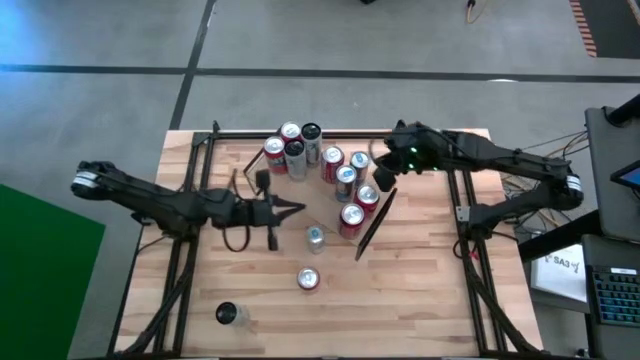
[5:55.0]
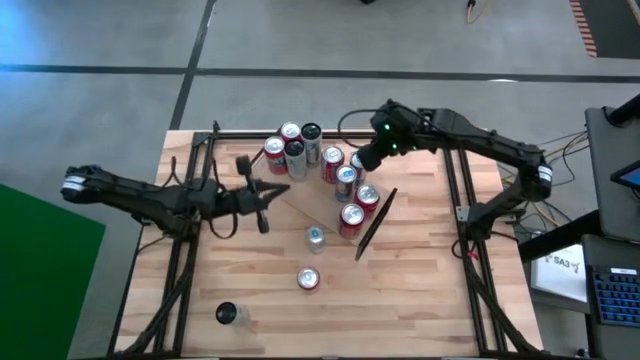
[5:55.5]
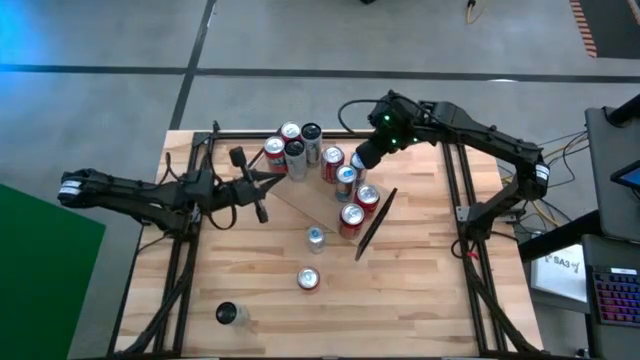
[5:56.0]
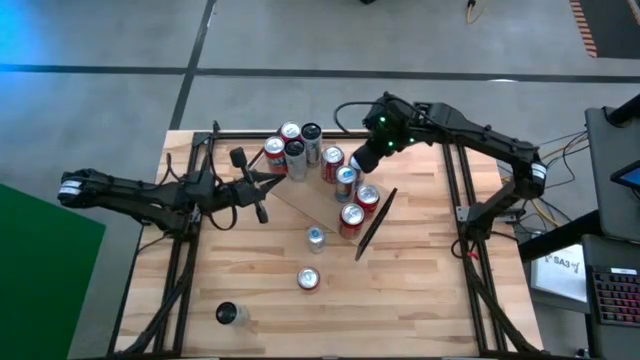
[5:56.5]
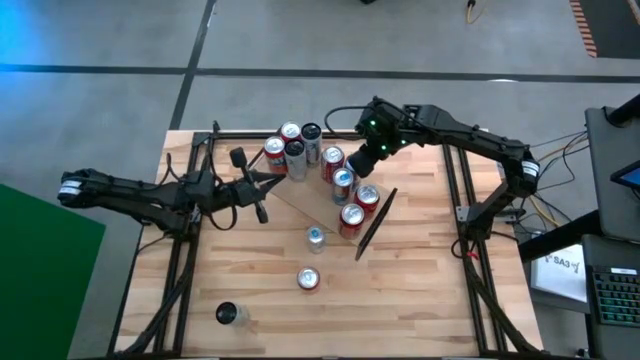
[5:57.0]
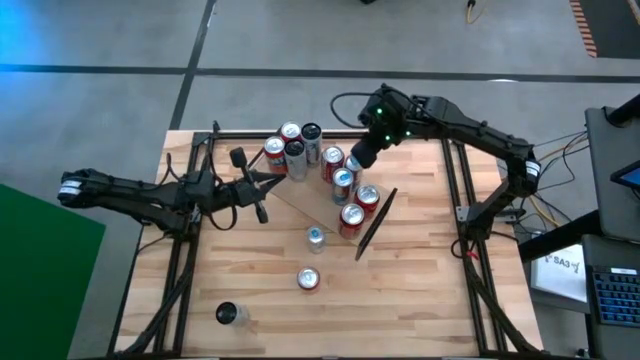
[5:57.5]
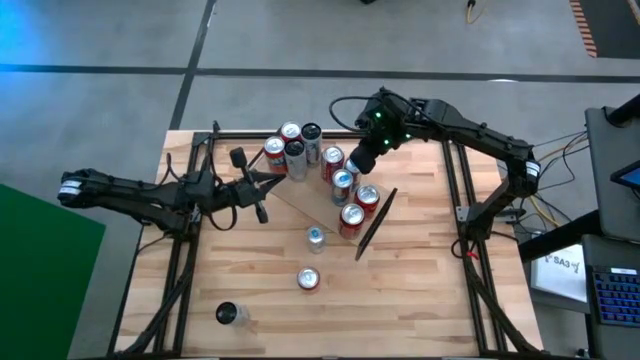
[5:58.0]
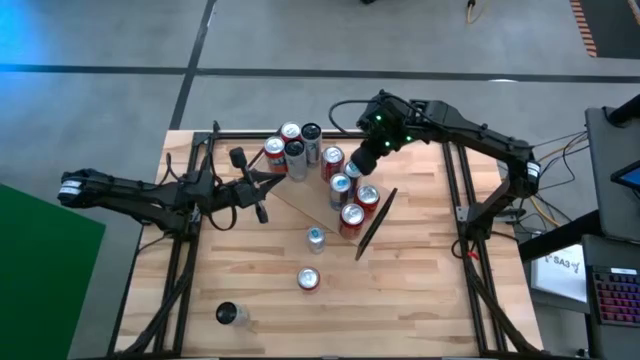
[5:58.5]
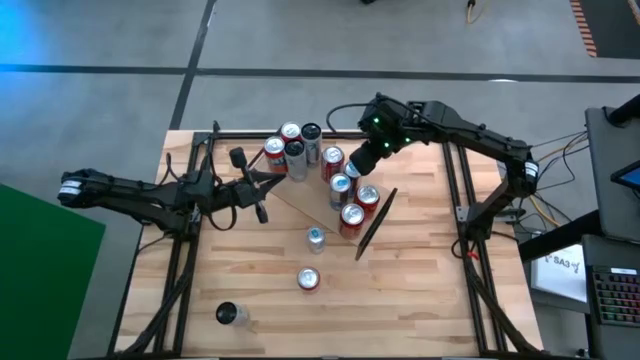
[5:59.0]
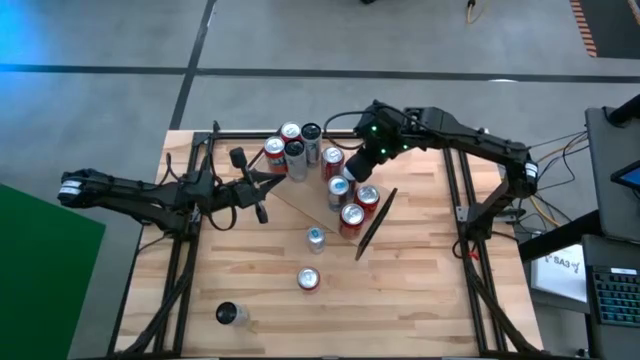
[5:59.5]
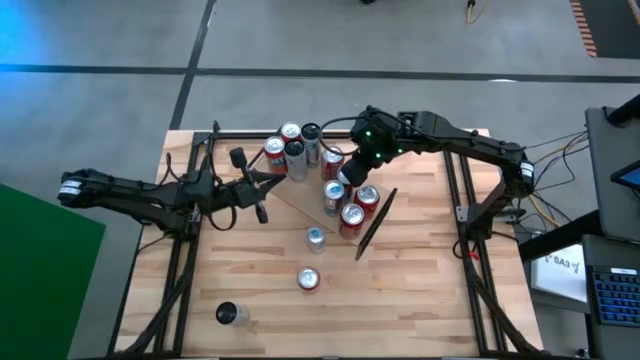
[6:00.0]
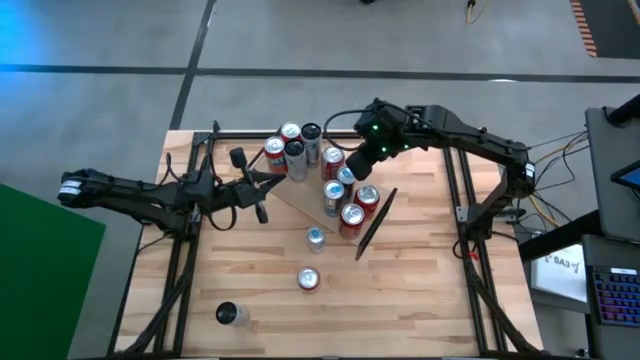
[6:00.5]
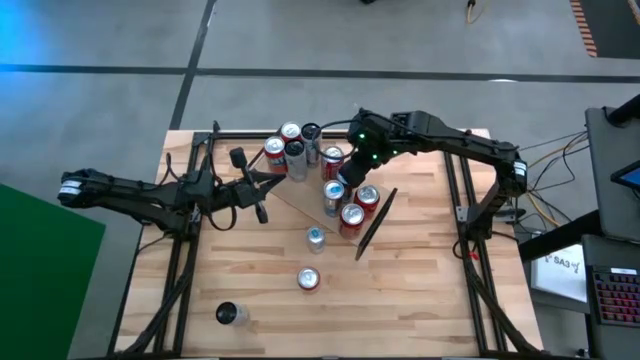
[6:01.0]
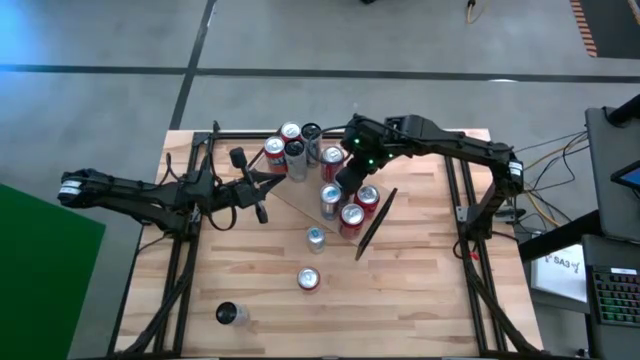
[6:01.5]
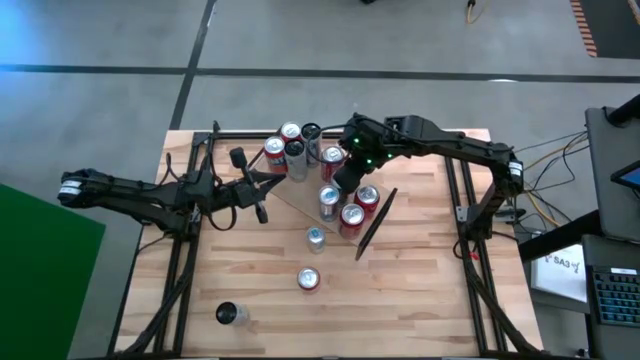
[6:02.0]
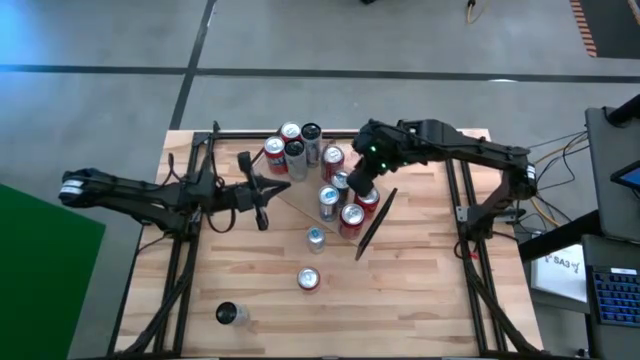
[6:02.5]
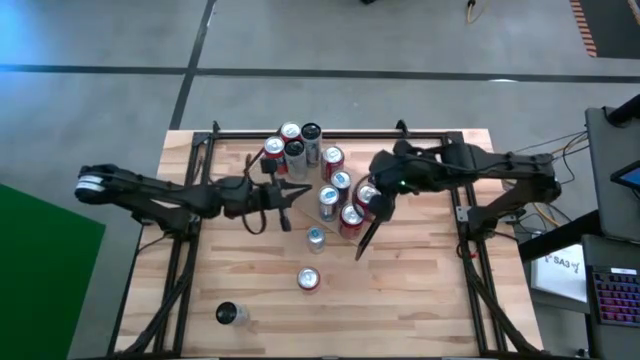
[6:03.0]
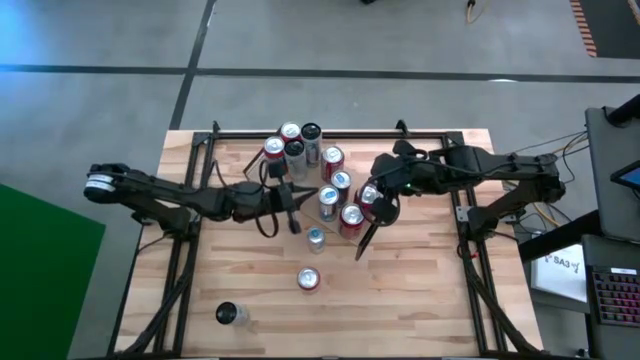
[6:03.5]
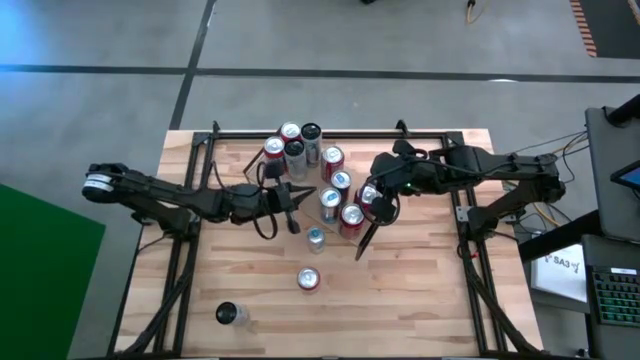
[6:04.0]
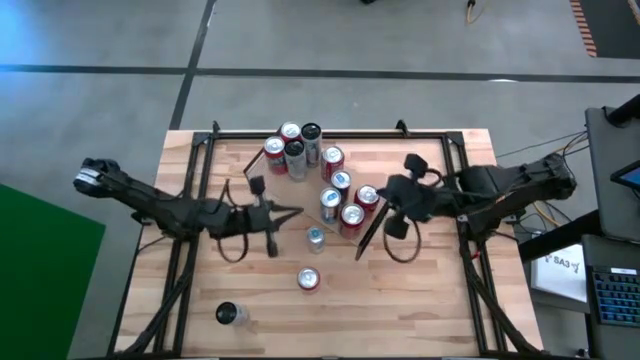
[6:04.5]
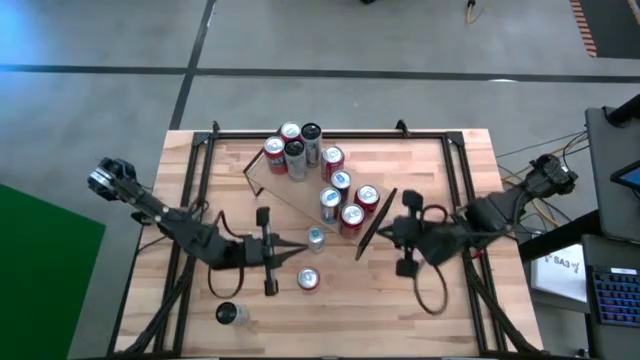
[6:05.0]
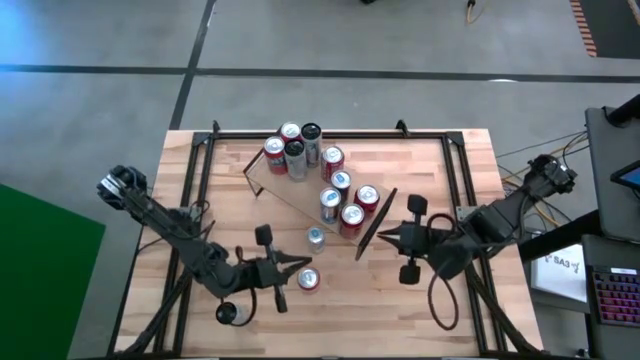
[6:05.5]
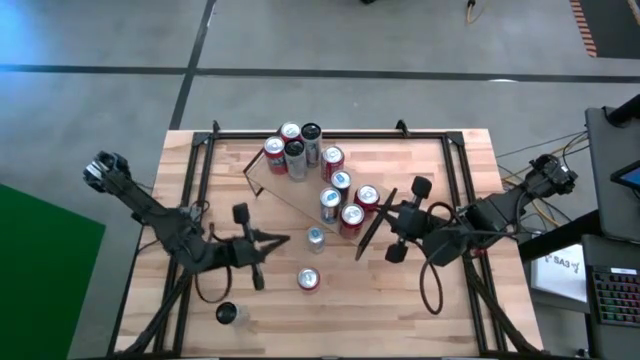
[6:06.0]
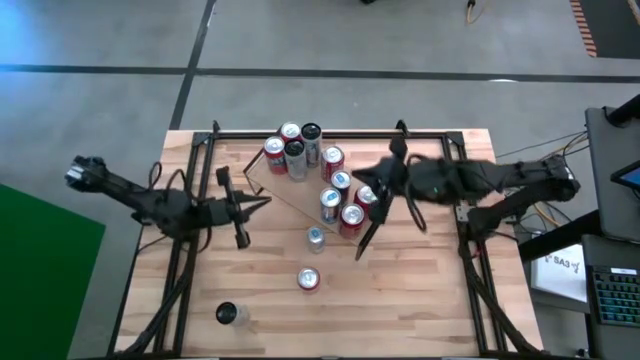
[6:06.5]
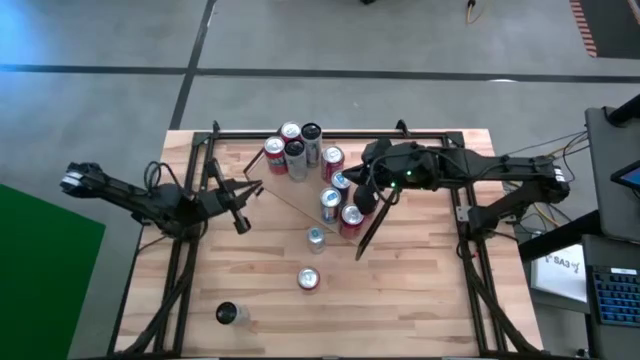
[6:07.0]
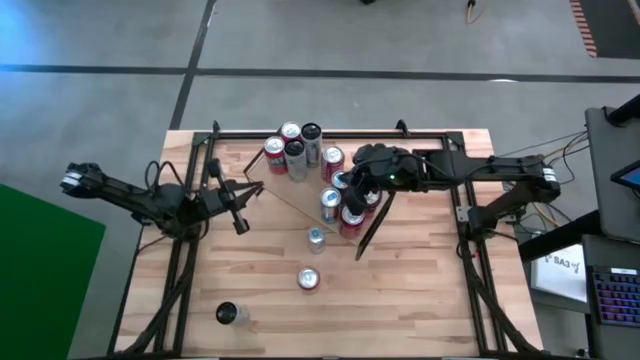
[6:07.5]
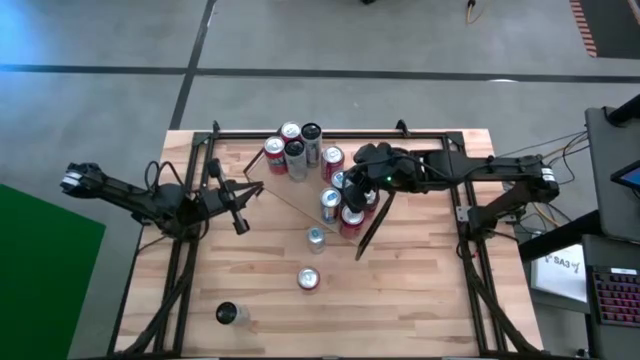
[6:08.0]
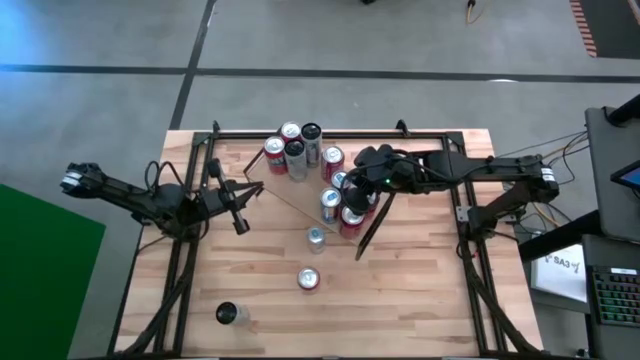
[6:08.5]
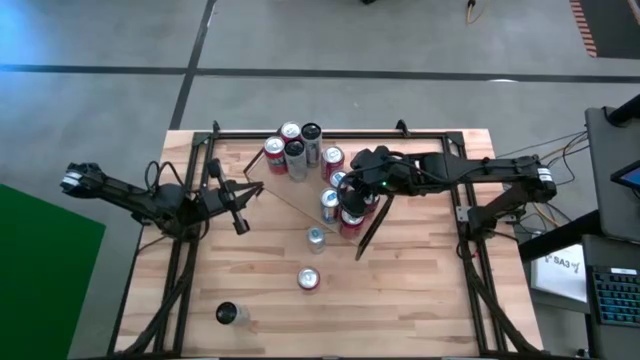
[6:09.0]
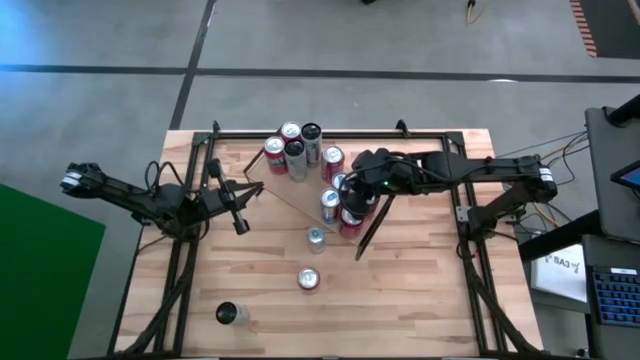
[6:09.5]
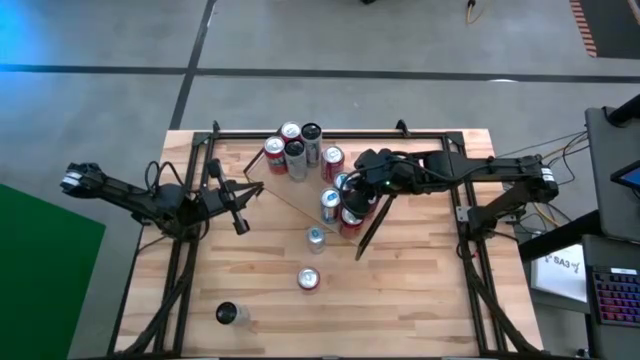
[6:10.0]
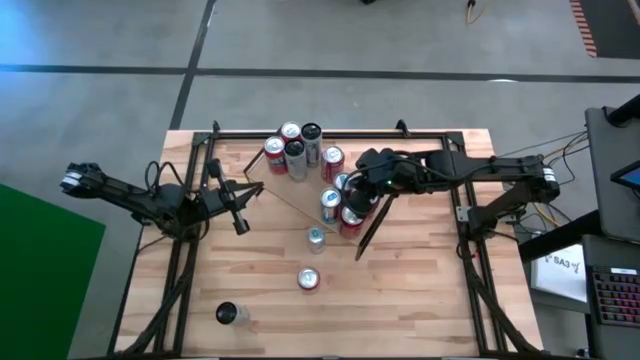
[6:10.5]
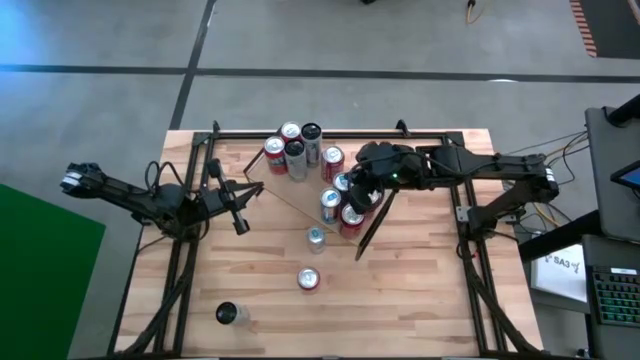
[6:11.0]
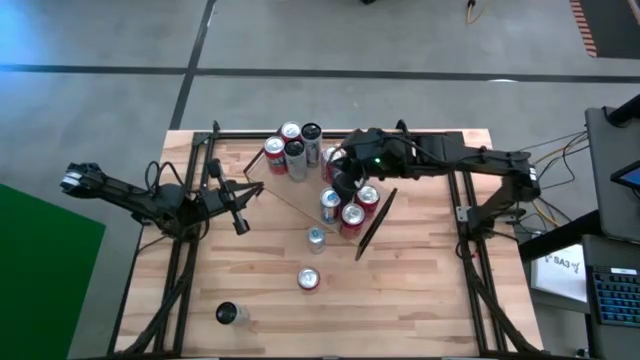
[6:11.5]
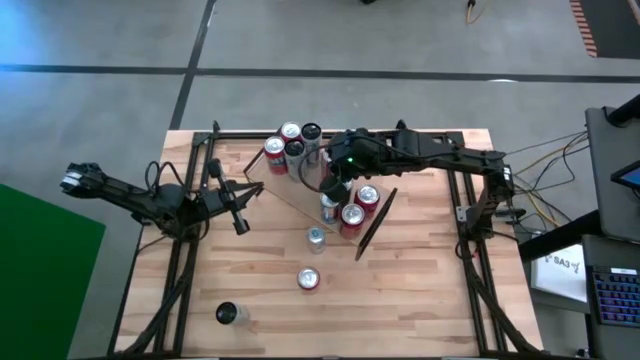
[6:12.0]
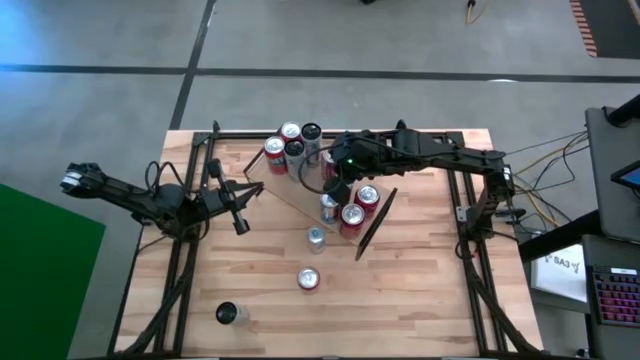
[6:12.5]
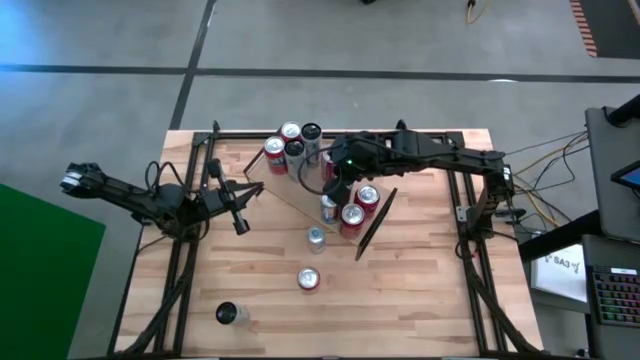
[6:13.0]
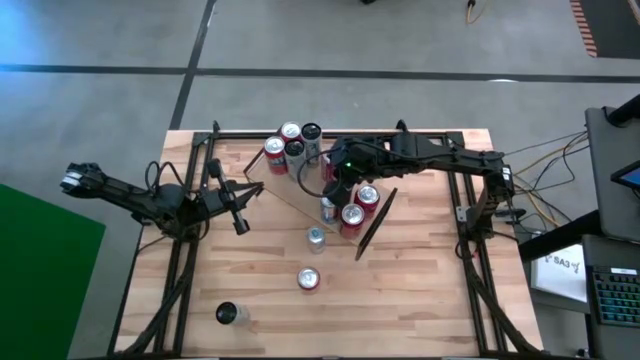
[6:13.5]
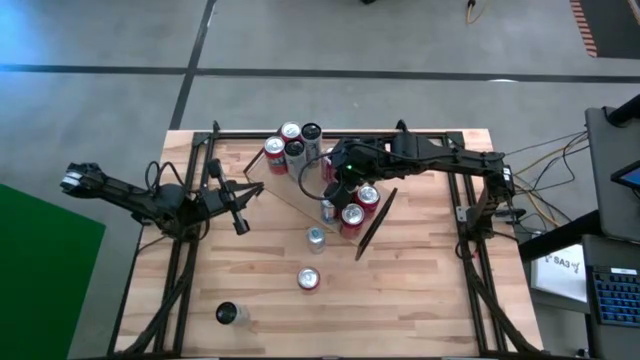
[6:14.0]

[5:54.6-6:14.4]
Task: Place canned beverage on shelf
Adjust the silver/blue soda cans on the shelf

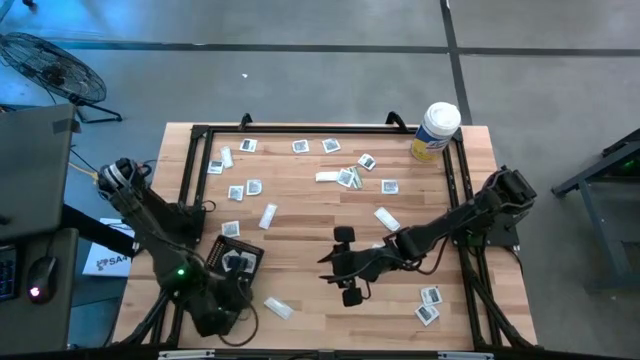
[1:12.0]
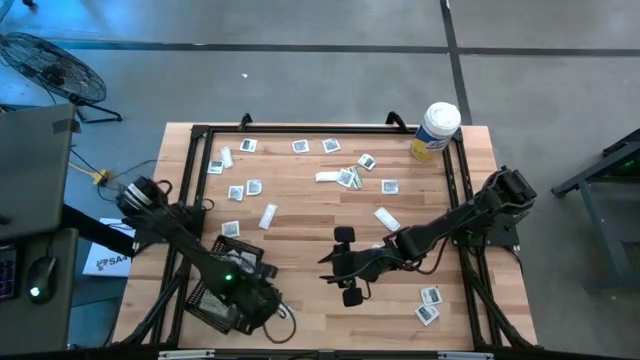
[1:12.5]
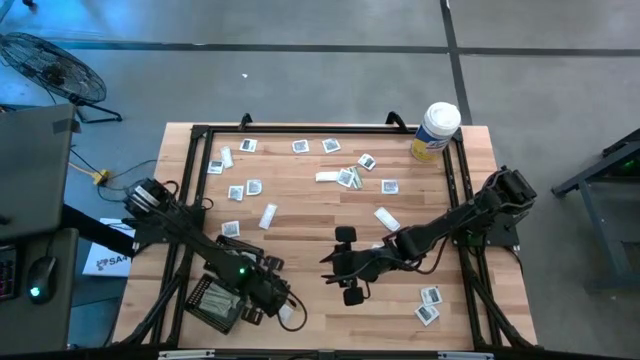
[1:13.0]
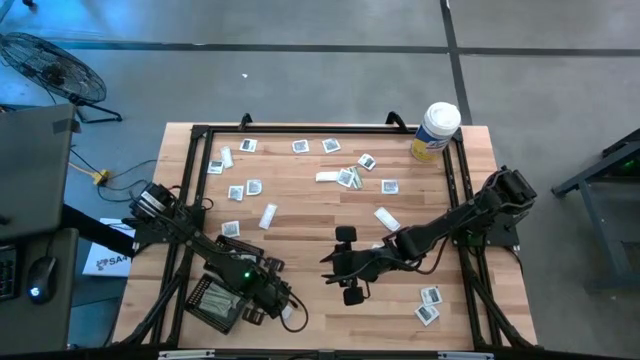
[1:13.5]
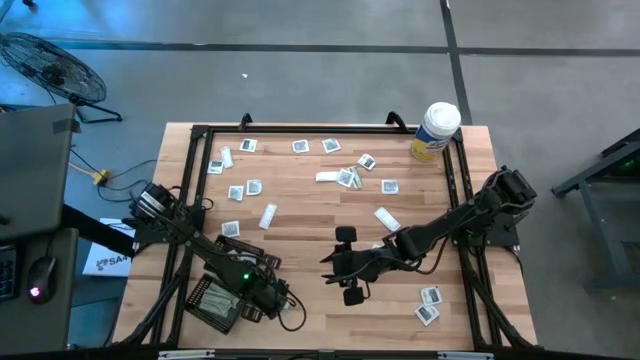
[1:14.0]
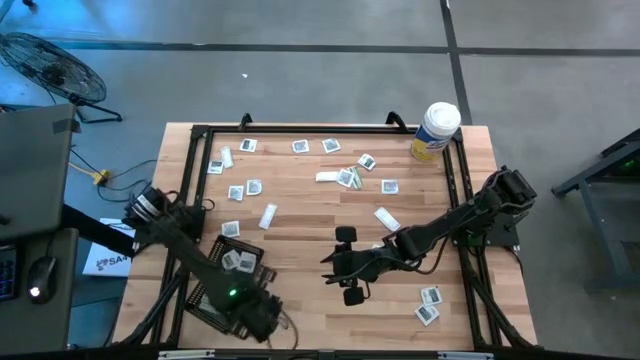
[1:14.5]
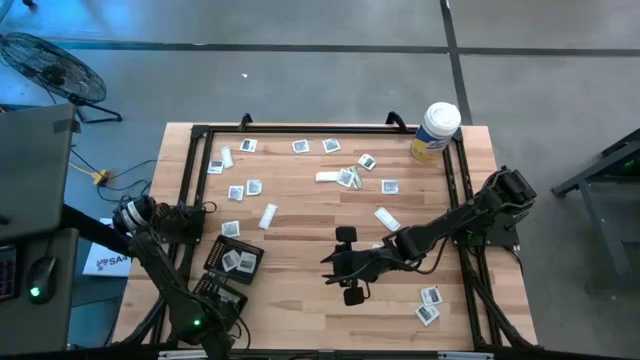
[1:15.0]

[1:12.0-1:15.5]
Task: Pick & Place First Aid Supplies
Put the bandage into the bottom black bin
